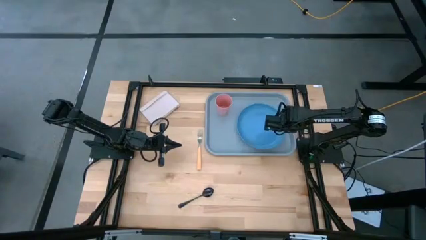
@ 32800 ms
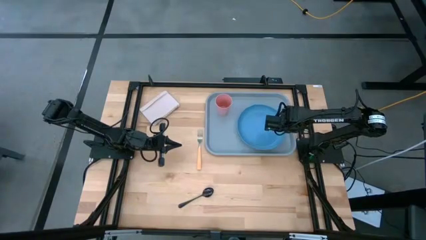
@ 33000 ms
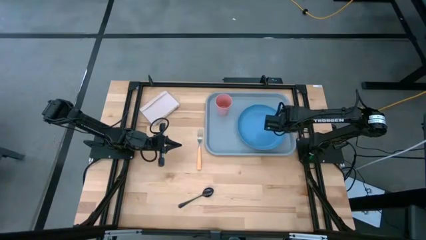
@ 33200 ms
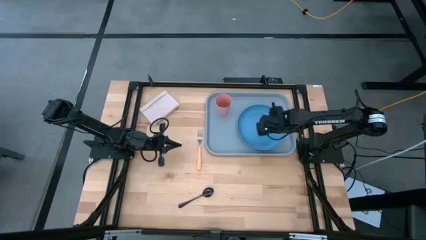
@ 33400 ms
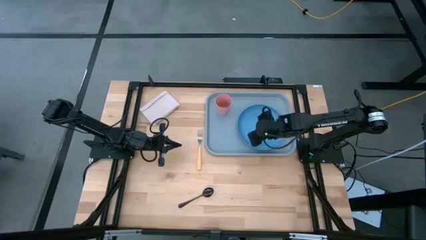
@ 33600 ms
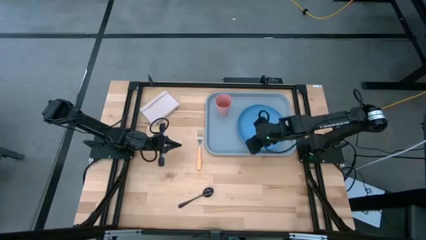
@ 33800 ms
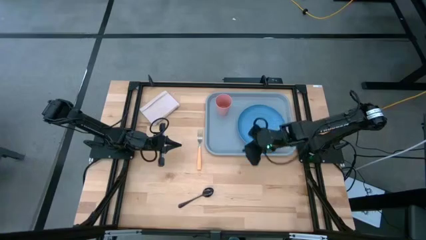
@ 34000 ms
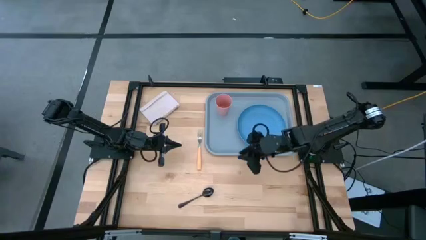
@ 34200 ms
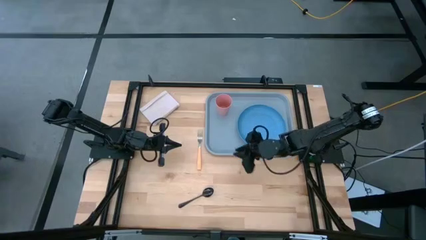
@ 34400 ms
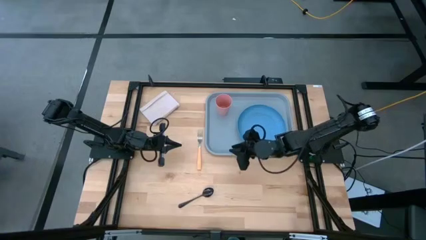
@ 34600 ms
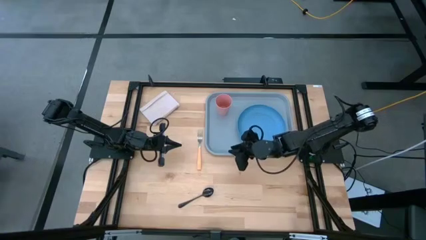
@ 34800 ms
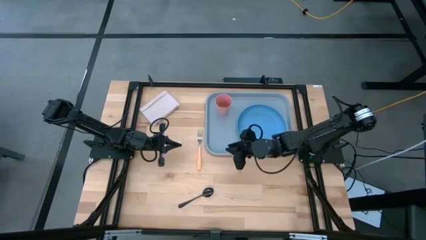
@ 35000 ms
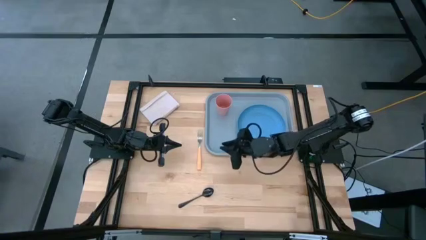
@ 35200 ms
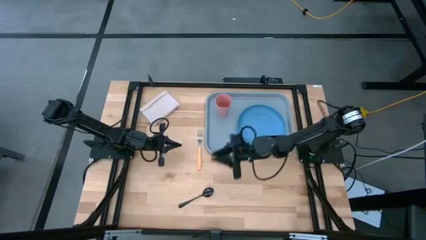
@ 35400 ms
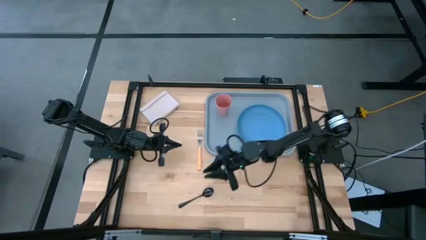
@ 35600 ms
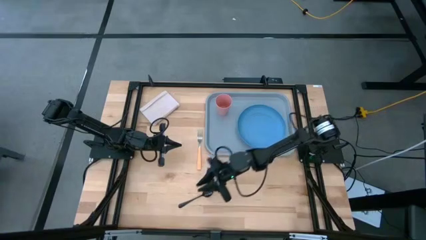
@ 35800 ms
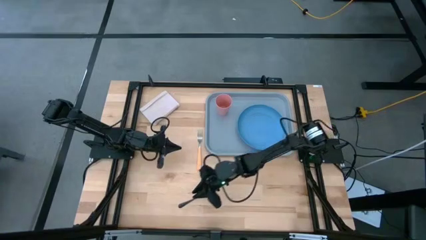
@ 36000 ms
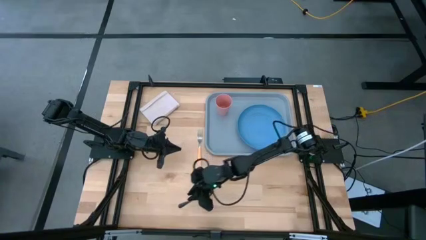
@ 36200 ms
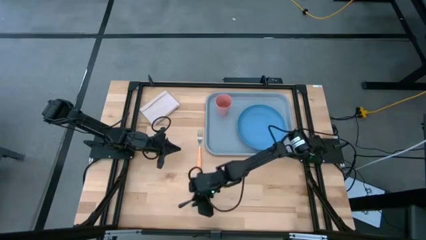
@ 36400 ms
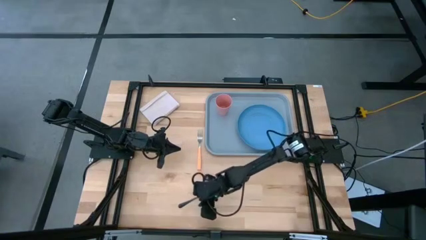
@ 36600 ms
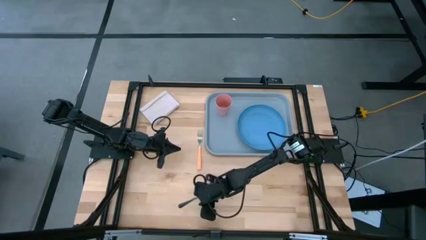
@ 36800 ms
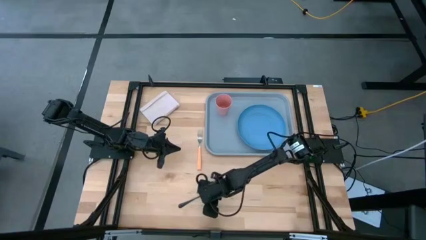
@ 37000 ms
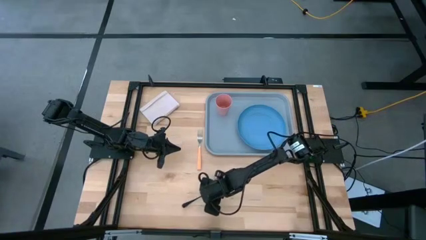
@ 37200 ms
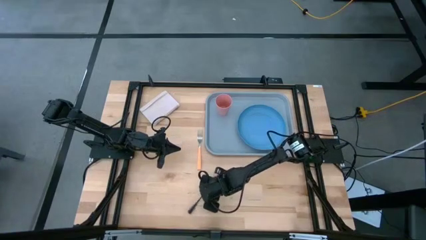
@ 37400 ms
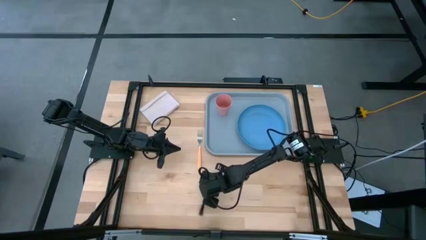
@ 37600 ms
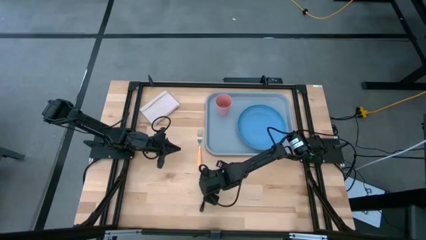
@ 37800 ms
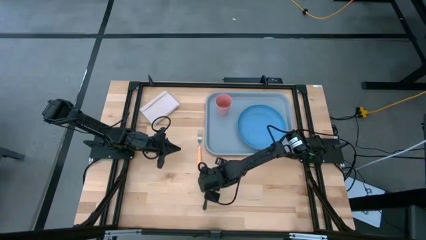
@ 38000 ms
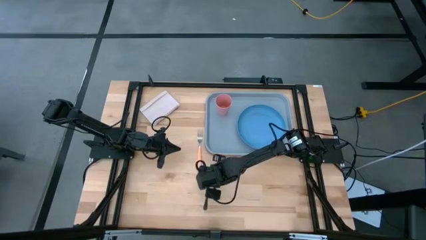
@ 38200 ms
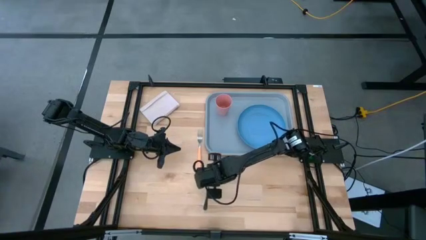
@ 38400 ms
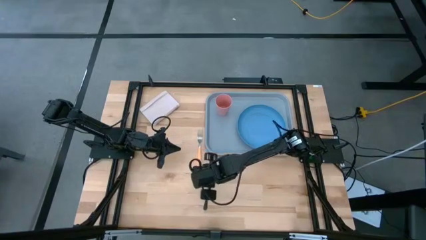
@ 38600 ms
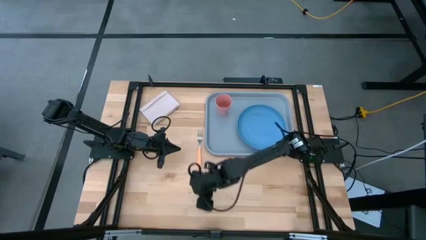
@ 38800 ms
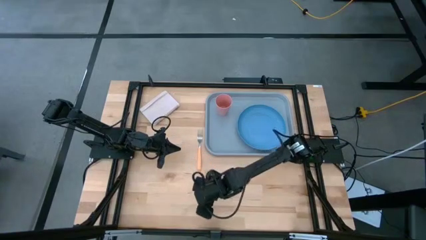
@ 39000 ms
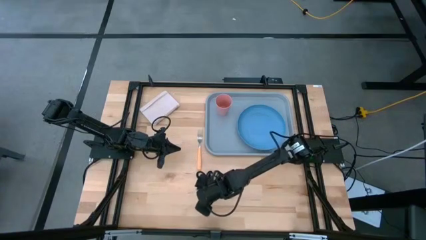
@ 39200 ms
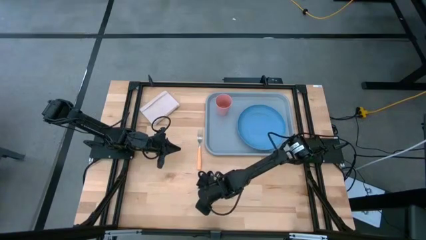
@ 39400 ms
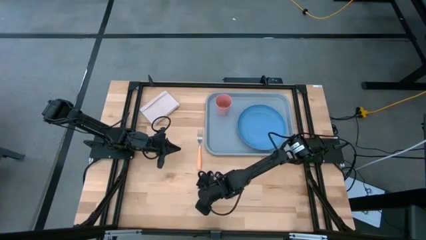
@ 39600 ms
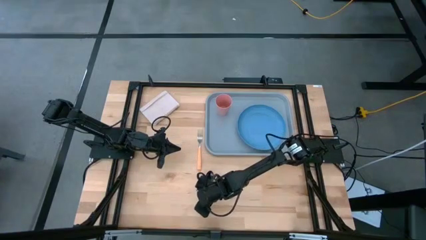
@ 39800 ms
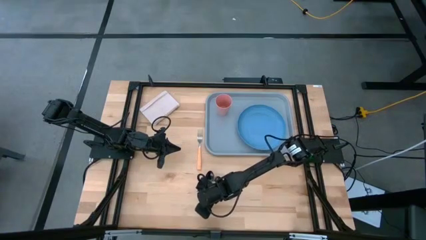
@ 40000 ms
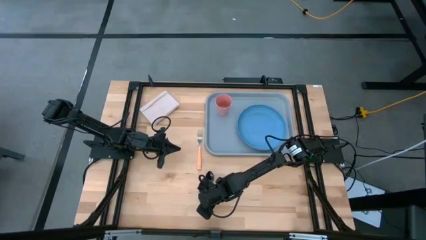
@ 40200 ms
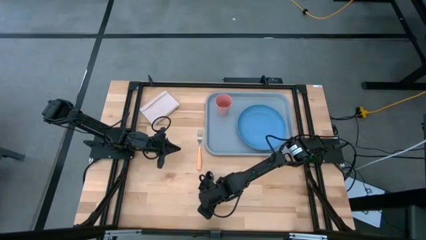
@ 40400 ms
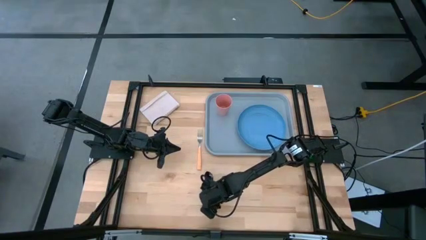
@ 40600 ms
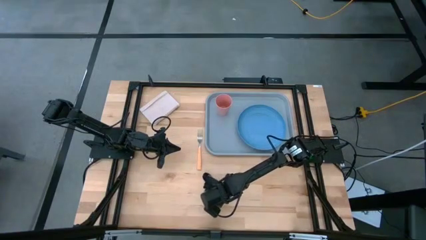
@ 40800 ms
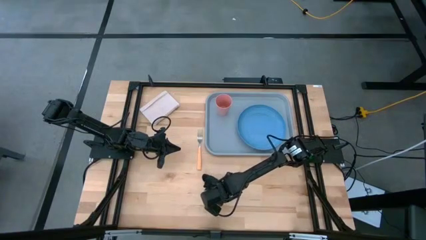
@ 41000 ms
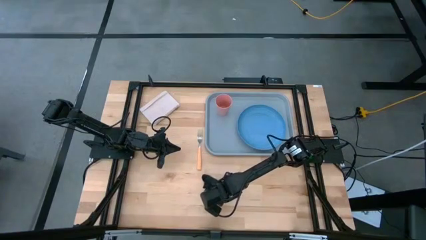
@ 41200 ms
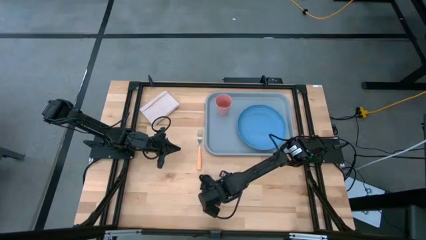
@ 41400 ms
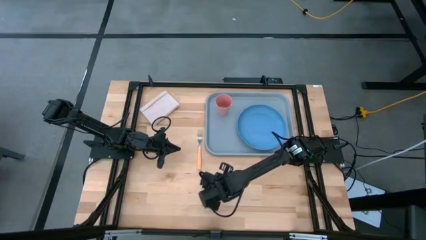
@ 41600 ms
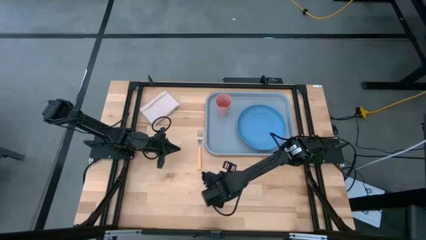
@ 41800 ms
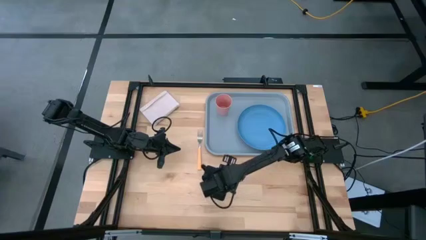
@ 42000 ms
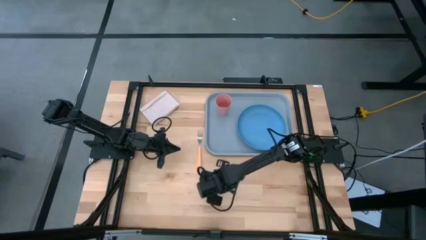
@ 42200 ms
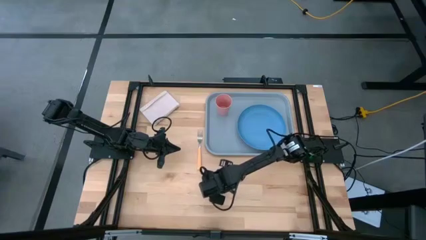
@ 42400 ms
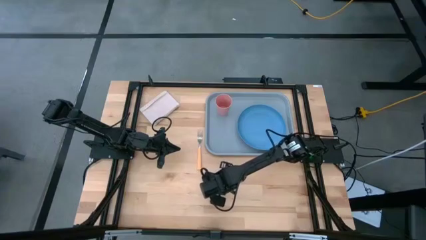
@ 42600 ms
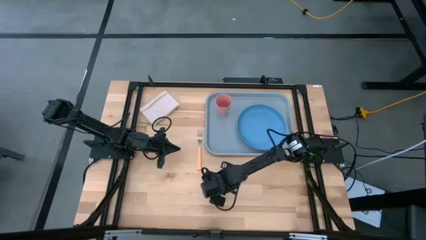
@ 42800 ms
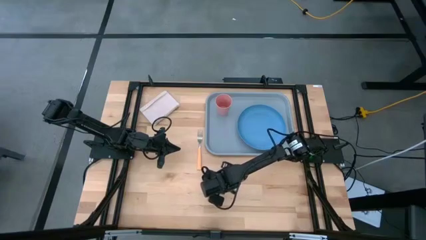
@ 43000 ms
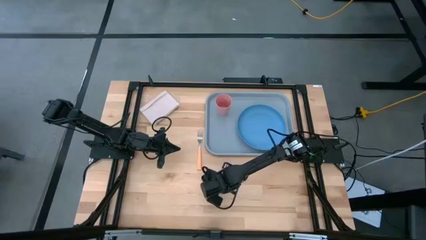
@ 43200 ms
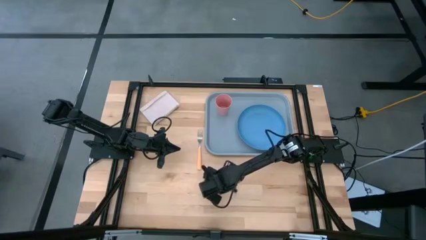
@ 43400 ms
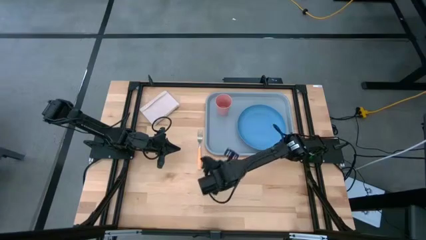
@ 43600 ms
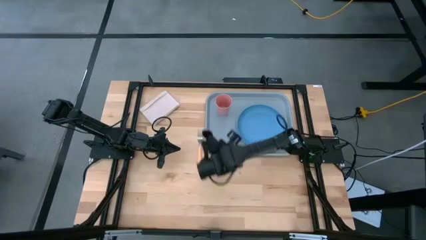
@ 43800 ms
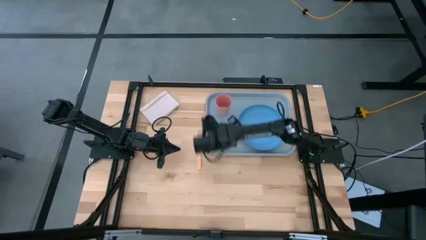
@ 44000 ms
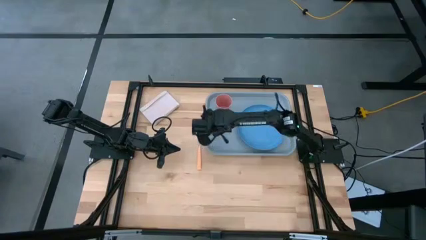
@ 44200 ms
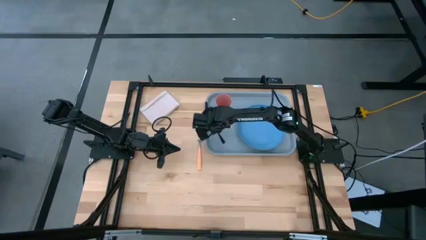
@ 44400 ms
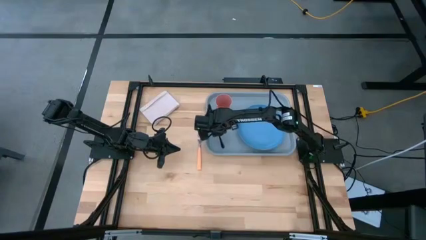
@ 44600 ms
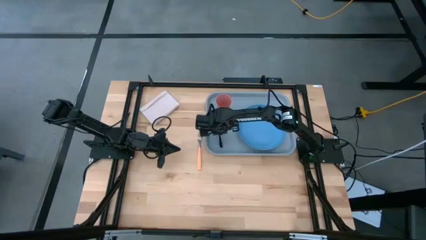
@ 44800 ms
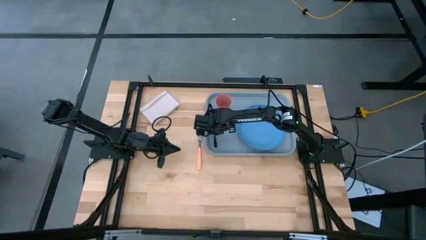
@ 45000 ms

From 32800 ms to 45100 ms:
Task: Pick and place plate/cup/fork/spoon on tray
Put the black spoon on the gray serving tray to the left of the blue plate
